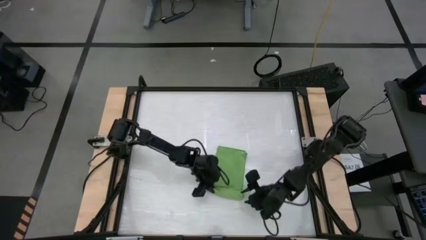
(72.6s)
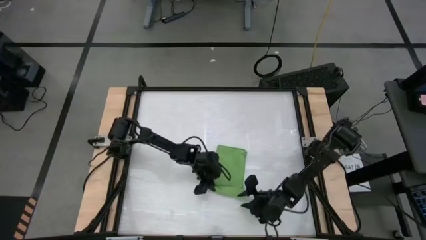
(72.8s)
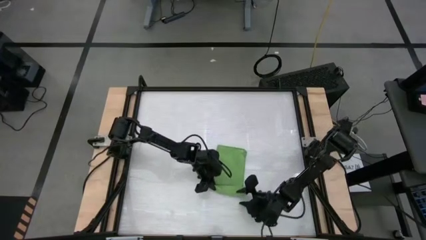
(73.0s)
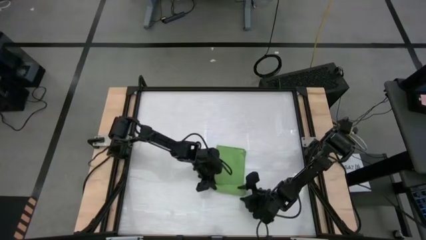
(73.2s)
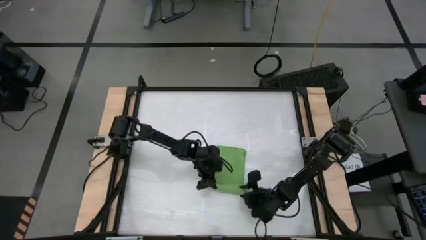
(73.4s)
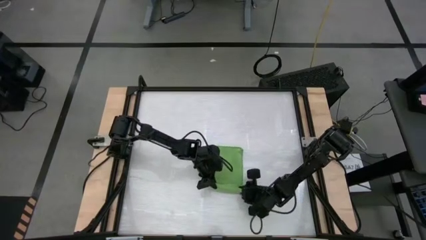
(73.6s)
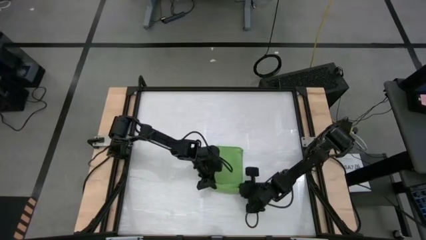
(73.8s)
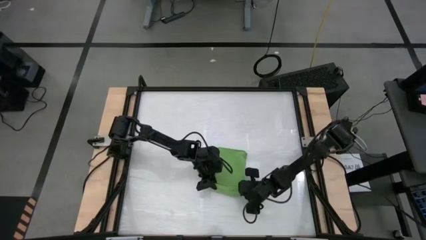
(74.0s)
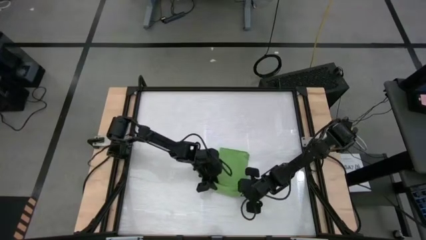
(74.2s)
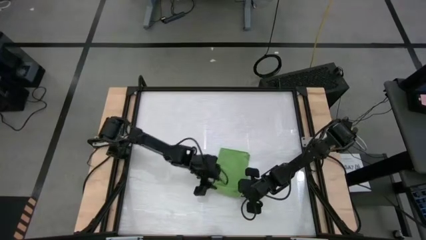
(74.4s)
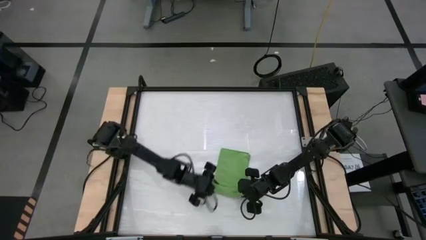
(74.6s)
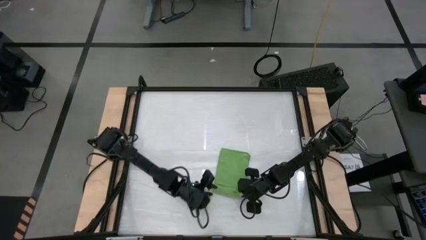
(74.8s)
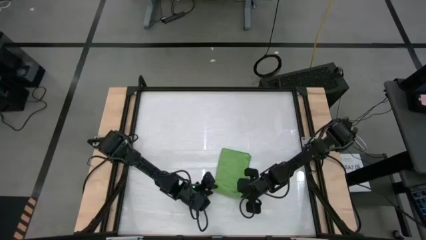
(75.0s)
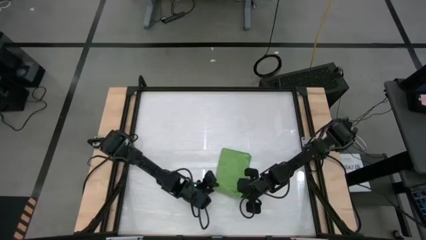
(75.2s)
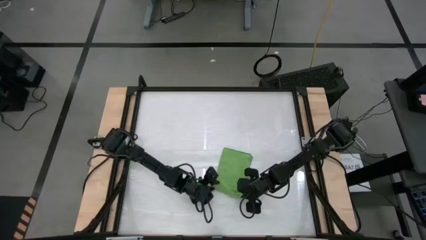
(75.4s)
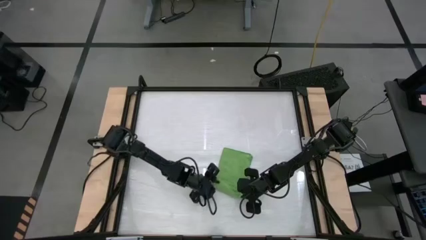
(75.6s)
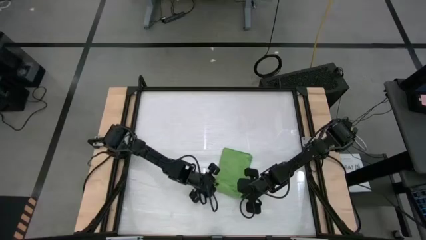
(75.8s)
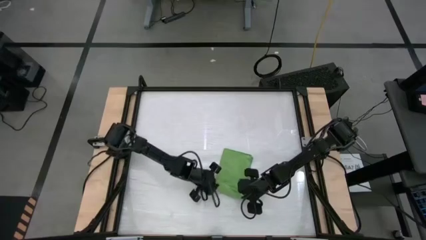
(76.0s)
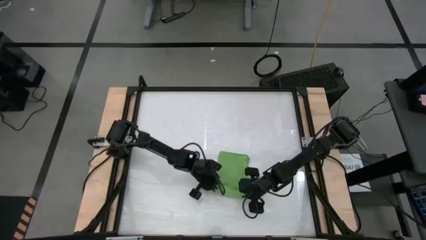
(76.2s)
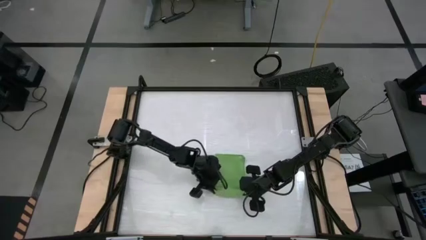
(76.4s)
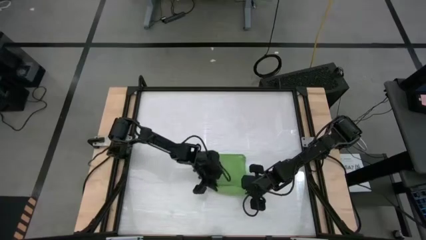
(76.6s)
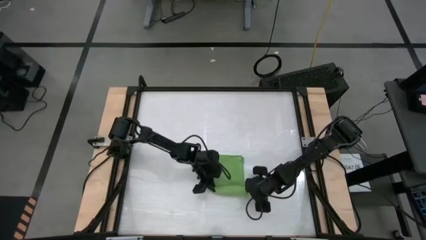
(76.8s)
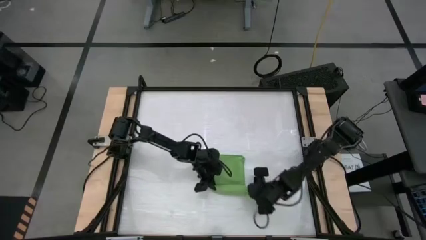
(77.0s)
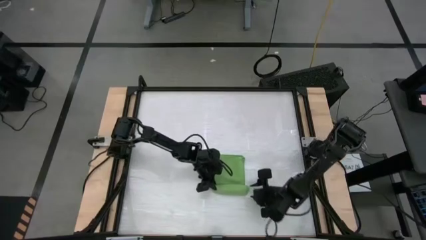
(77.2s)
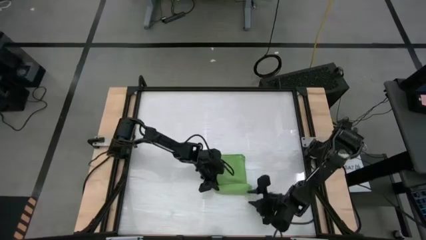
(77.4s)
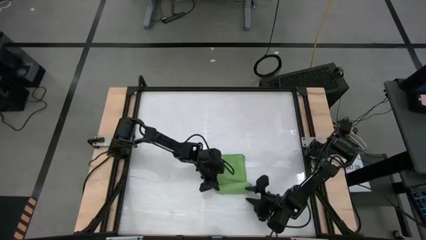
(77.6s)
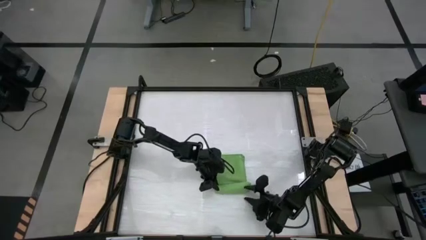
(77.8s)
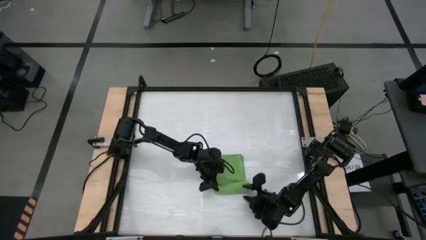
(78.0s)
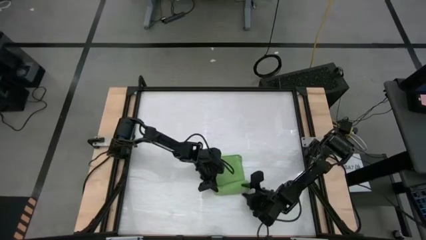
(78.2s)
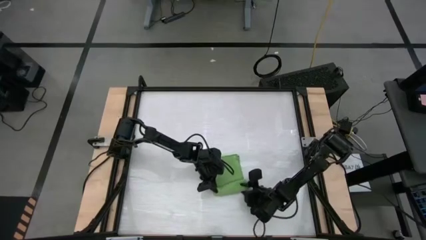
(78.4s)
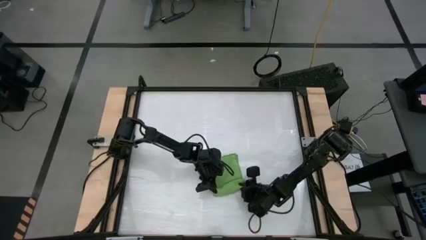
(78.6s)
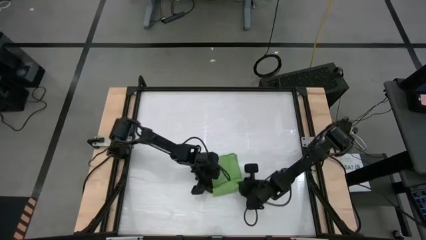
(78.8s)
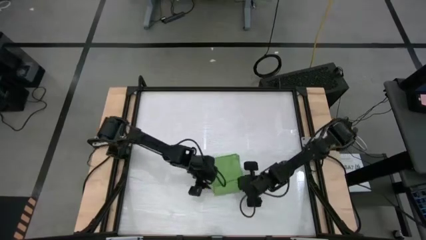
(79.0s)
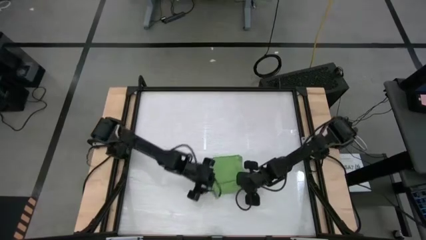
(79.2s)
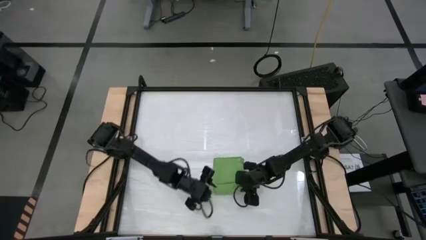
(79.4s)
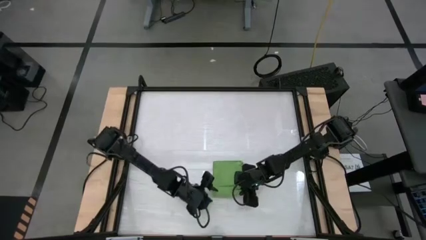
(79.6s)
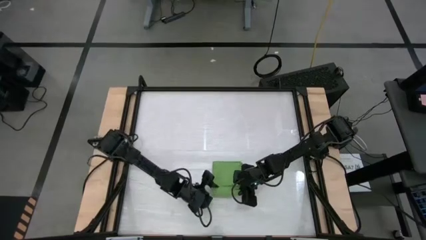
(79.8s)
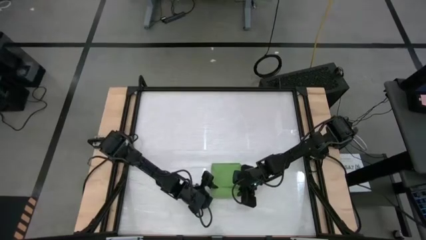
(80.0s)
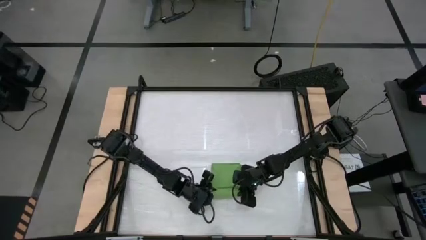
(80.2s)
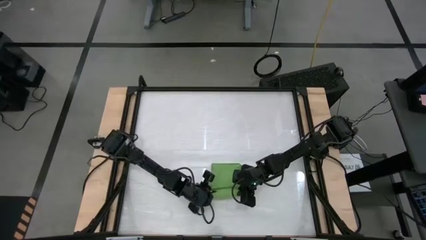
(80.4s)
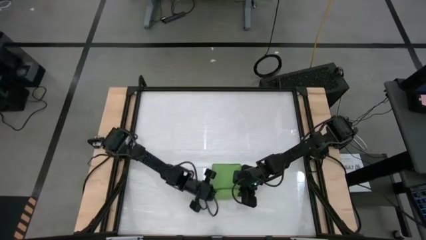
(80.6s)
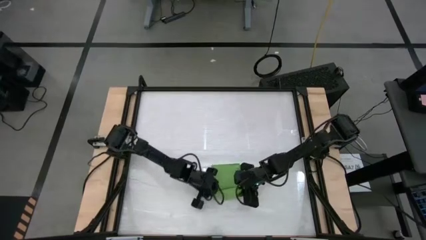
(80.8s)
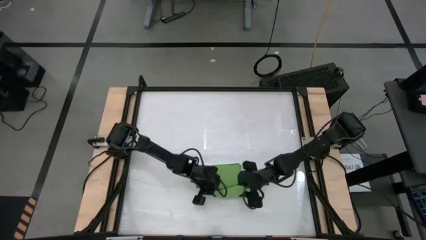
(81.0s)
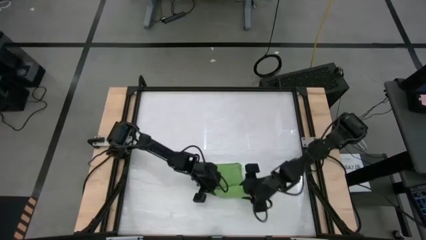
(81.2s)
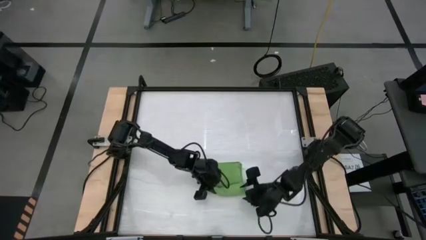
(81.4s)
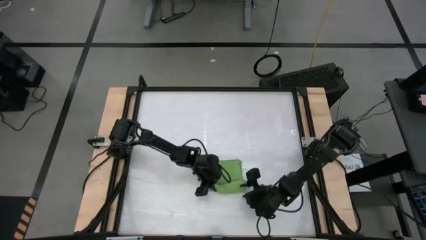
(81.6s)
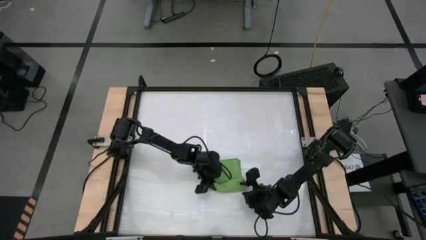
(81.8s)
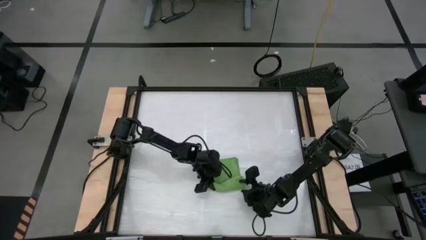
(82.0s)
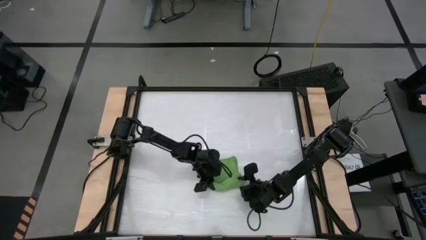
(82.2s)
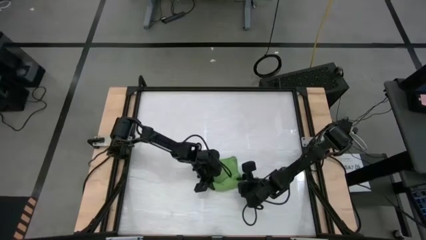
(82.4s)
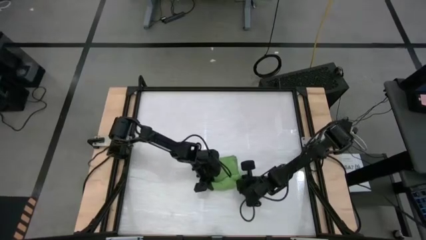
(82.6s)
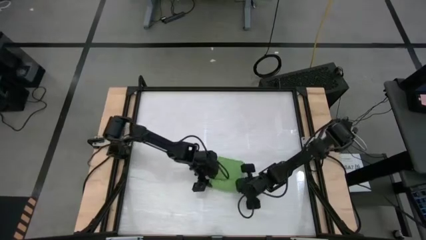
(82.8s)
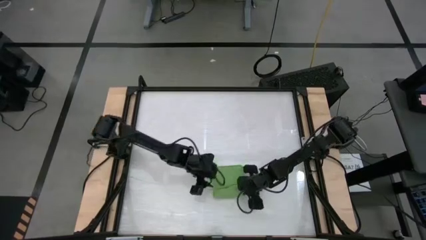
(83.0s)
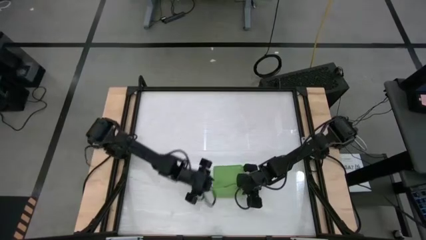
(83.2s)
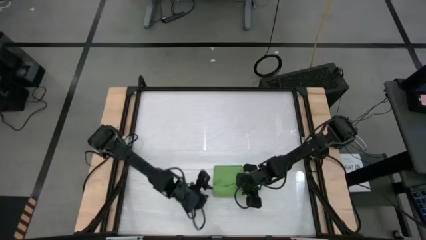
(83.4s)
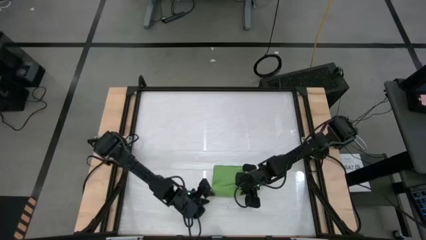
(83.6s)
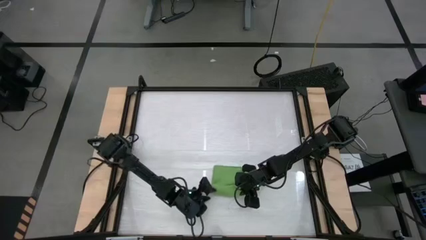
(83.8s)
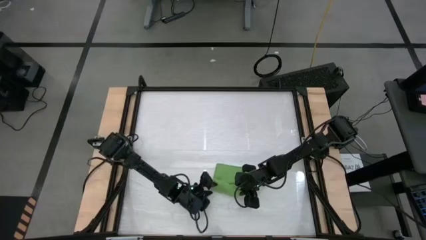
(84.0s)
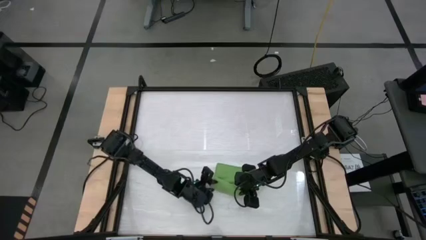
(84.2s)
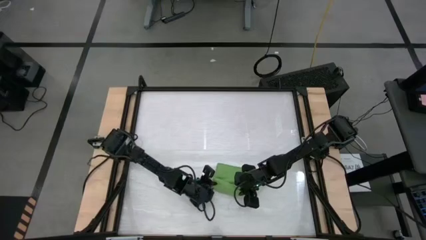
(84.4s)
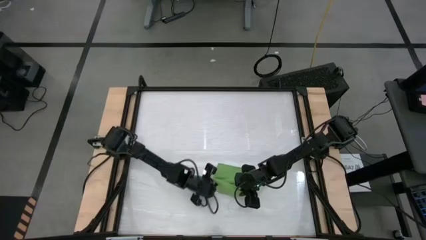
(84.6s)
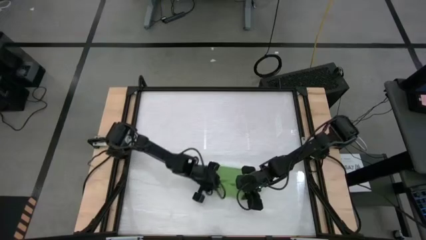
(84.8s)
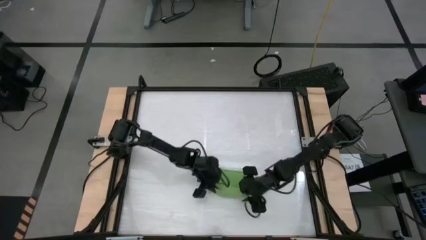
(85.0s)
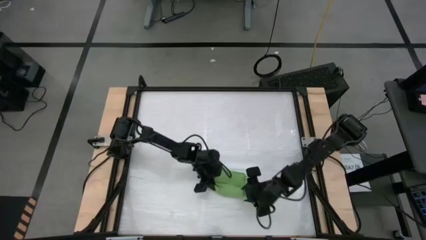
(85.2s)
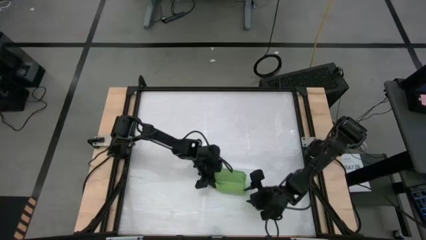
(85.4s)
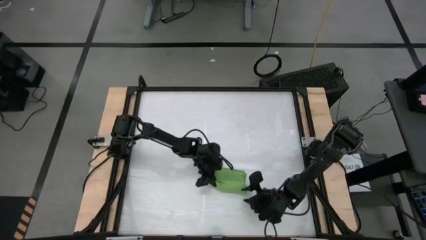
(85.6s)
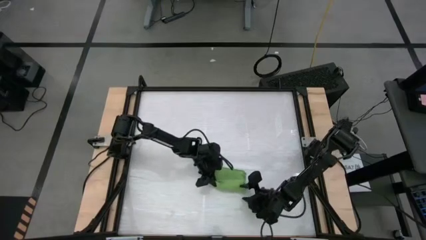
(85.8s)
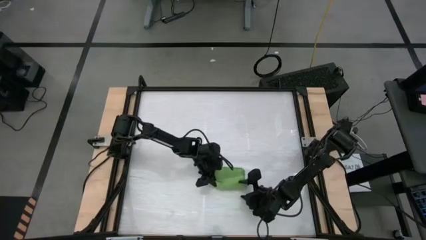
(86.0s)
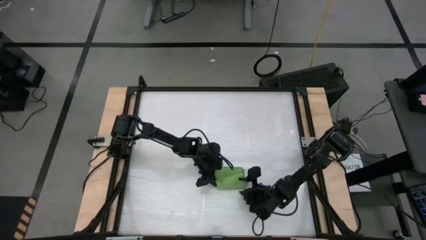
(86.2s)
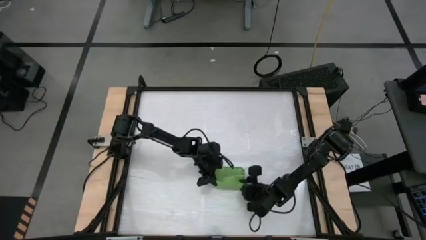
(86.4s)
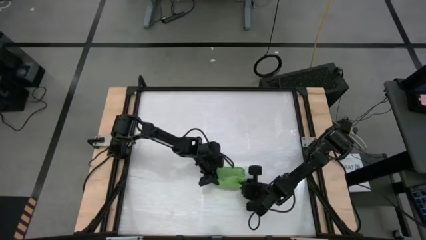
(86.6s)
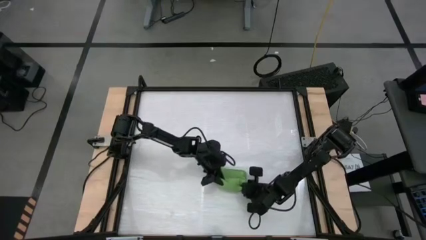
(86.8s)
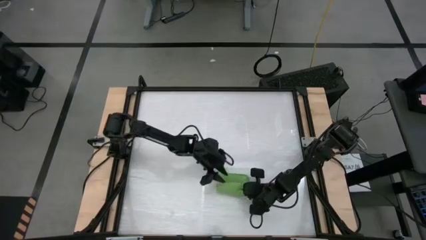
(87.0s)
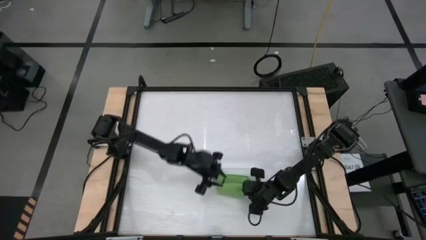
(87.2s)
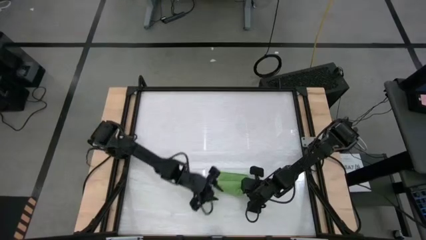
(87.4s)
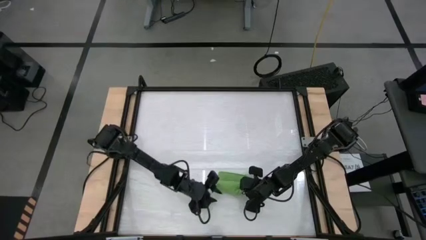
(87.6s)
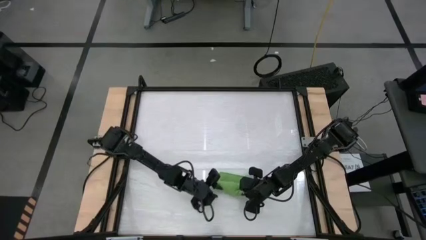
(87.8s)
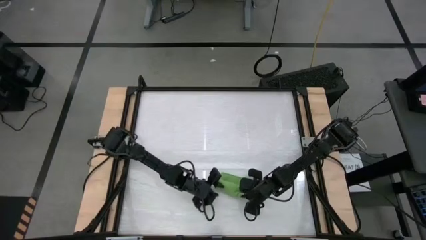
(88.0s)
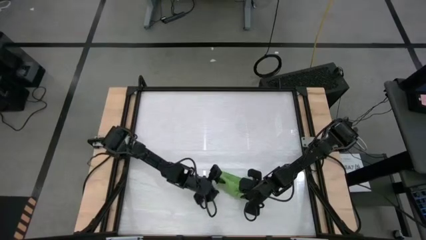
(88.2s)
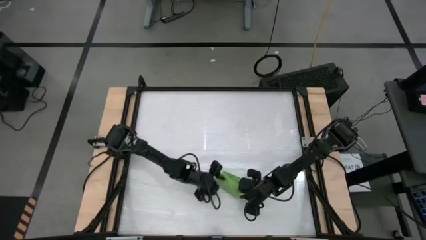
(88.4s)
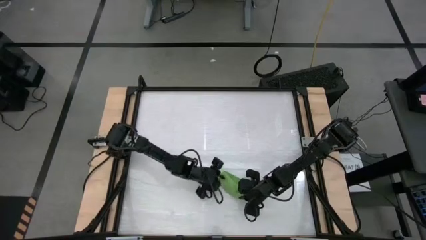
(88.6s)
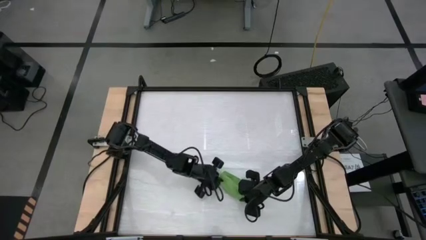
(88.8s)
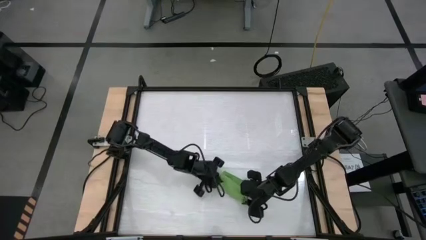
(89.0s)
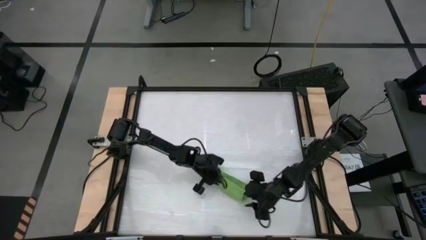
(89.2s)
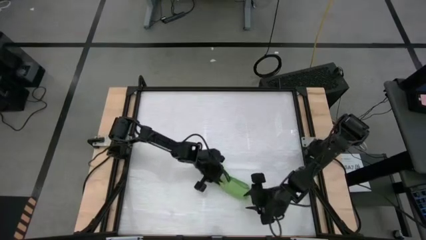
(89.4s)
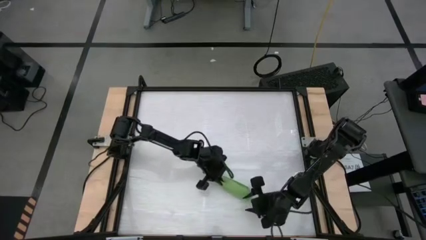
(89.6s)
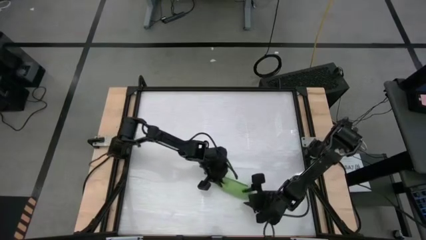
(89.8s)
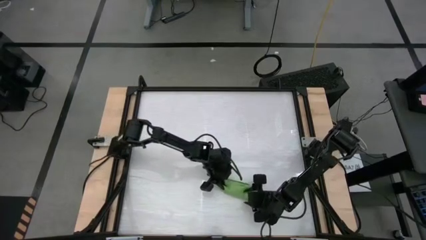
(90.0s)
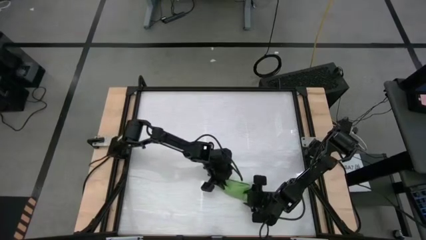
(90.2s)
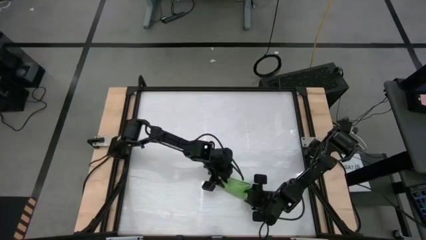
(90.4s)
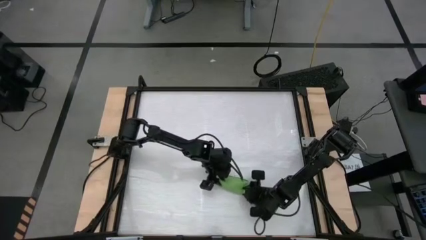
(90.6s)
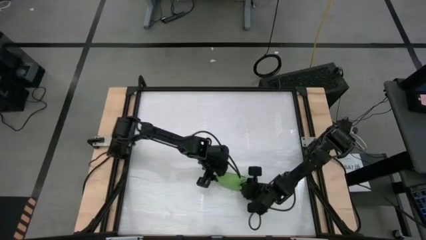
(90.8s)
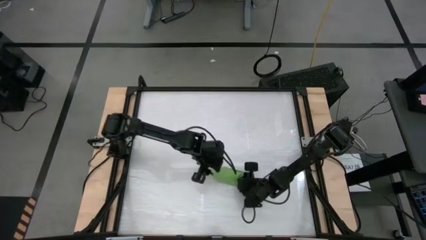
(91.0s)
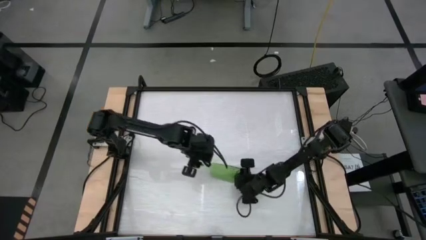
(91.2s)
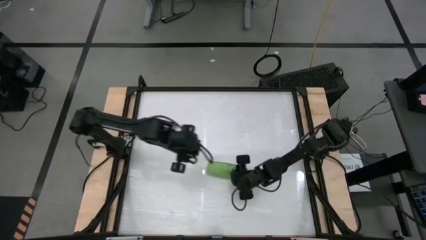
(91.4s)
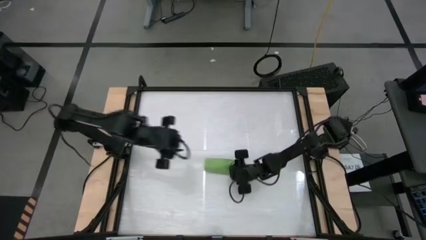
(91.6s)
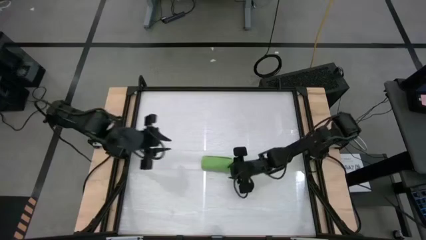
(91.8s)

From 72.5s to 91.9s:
Task: Roll towel into tight, uniform cylinder
Roll the green microfiber towel
